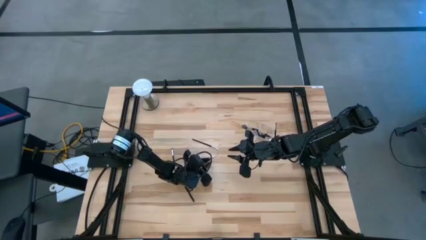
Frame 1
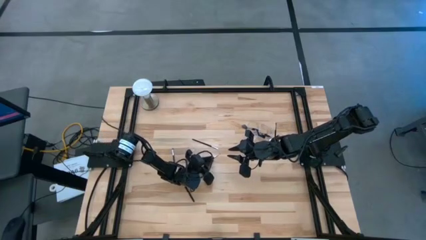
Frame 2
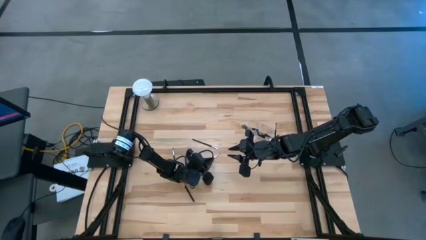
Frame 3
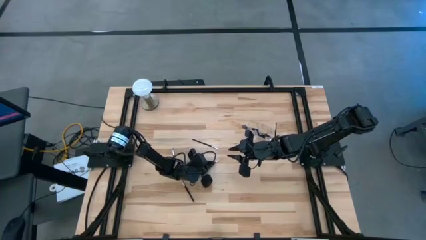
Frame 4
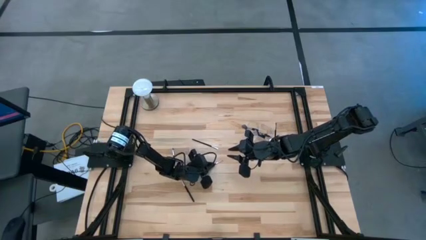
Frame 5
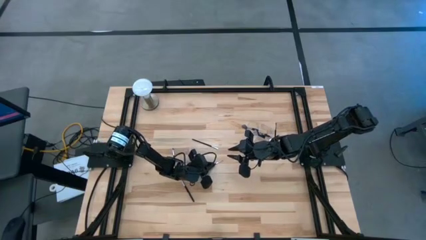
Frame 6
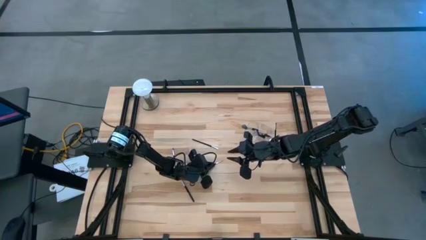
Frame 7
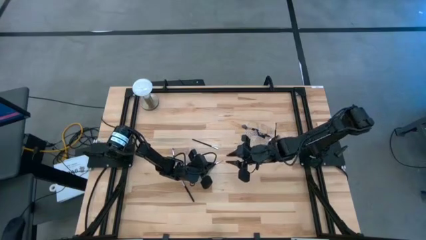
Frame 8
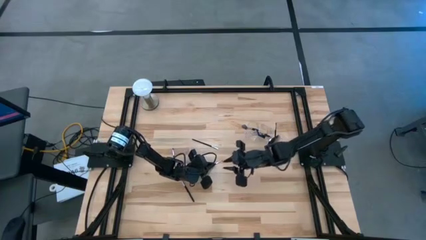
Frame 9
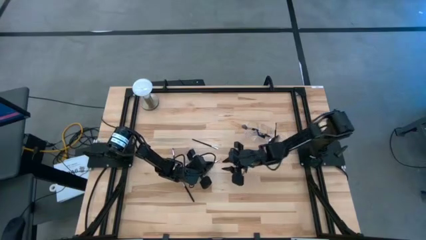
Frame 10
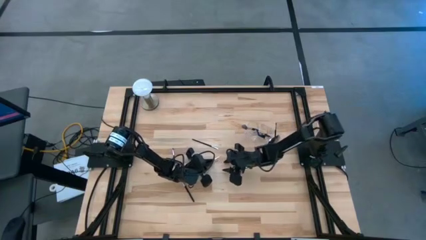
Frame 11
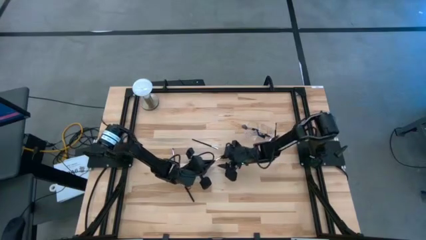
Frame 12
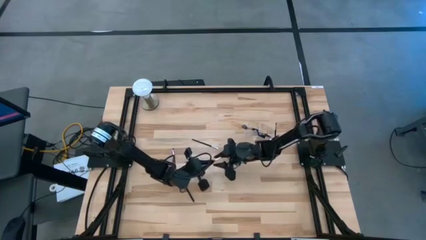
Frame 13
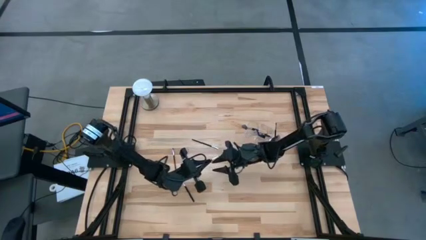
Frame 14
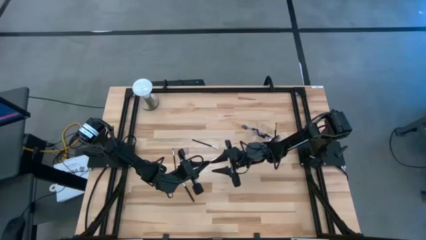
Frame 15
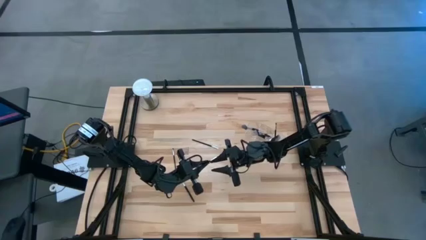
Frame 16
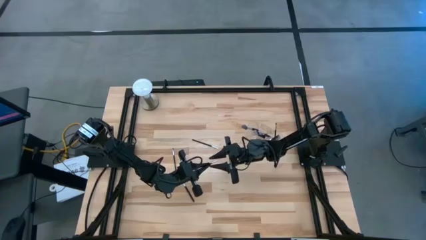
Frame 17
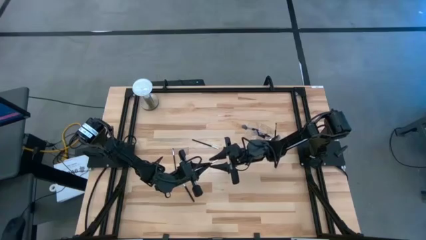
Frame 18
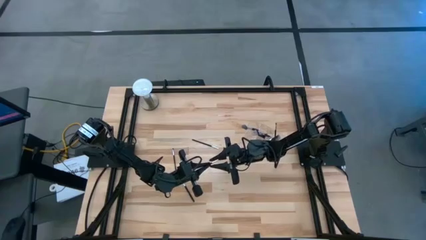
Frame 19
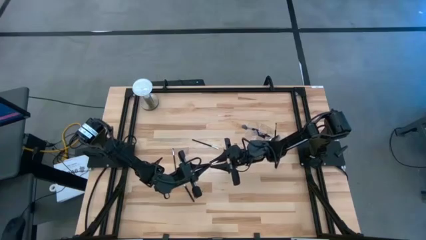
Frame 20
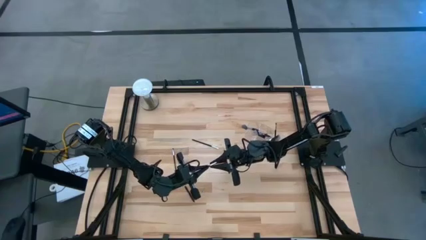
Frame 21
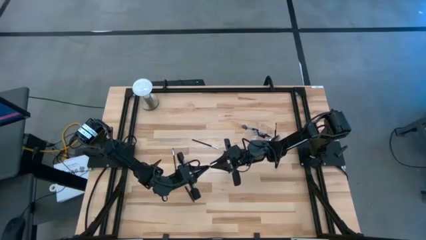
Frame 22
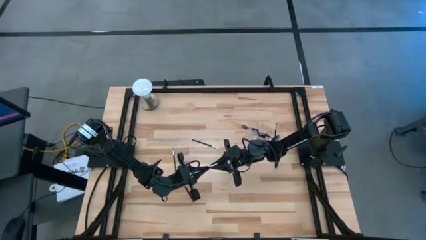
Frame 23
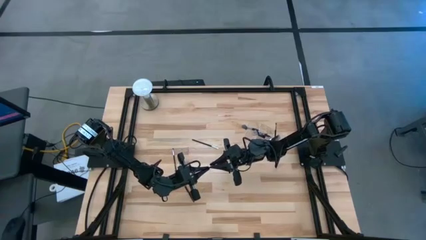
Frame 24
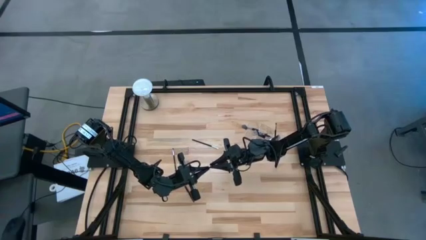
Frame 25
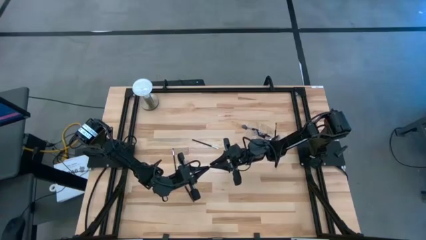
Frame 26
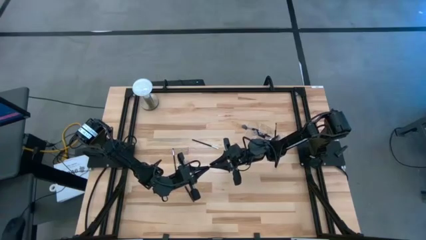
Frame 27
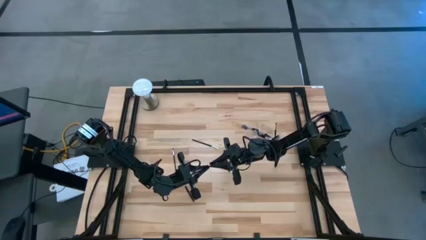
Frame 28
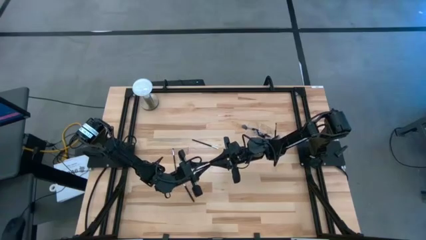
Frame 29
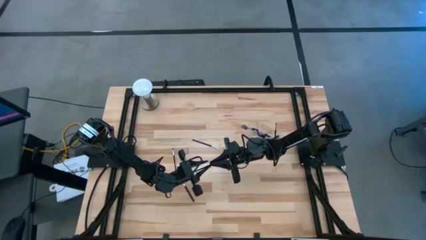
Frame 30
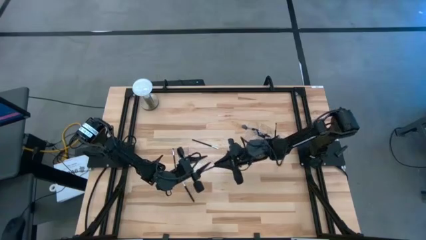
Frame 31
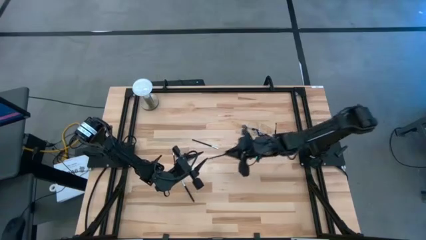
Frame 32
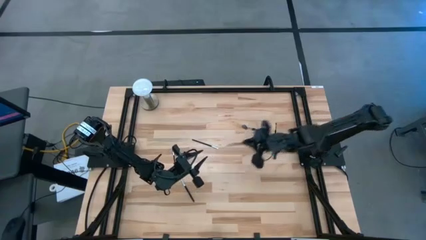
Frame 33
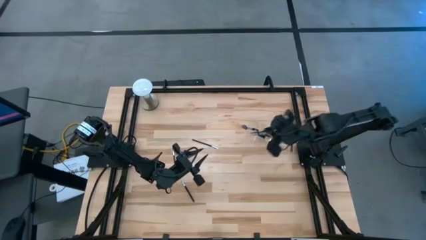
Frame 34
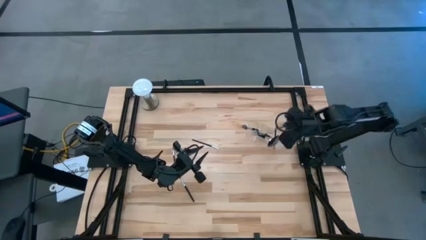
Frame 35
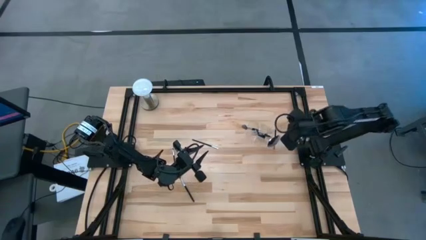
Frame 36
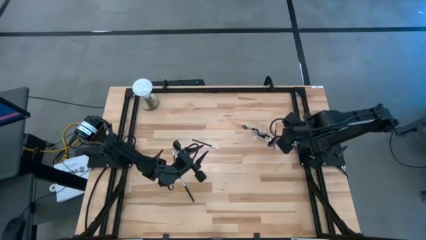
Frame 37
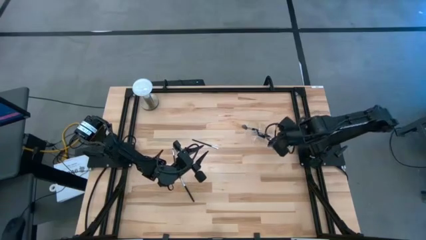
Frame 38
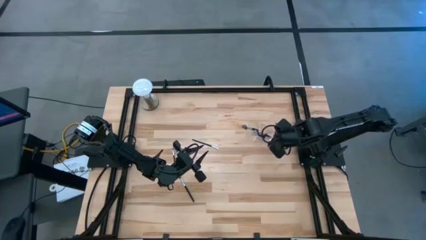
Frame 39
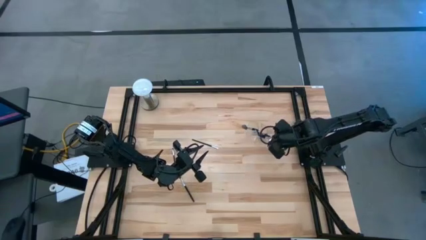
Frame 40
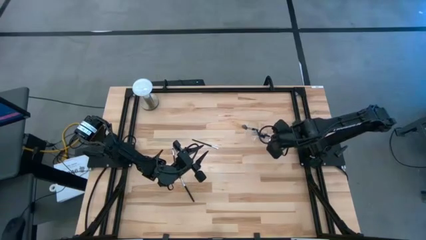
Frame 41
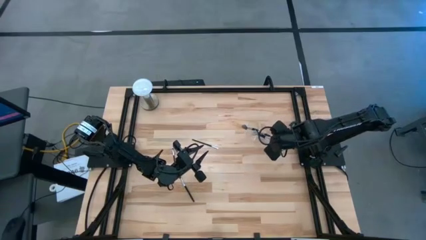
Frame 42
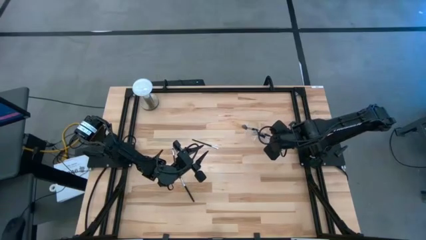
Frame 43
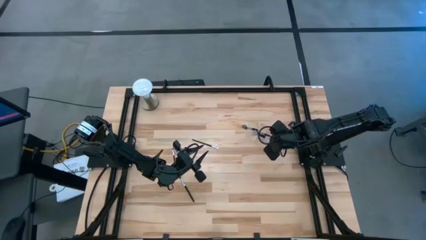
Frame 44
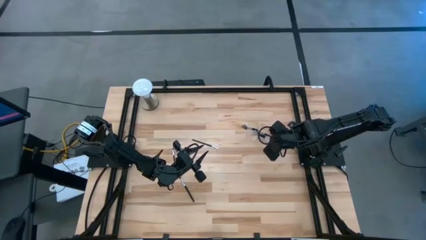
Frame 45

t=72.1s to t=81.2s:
Task: Pick & Place Makeup Supplies
Put the black makeup brush into the transparent organizer

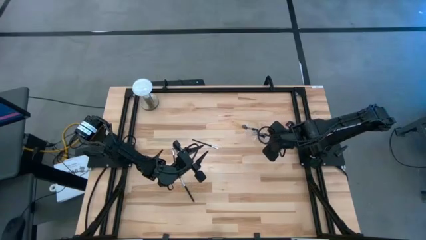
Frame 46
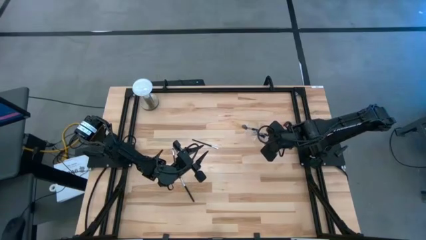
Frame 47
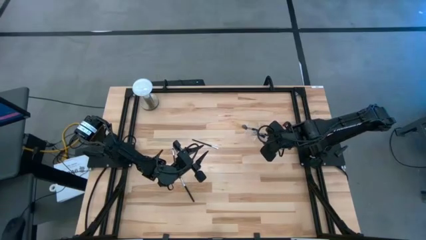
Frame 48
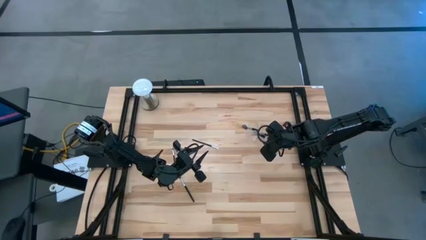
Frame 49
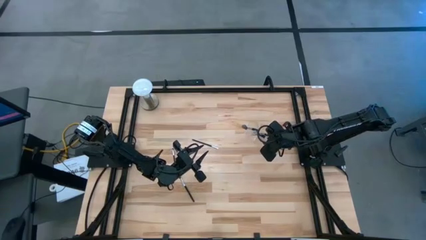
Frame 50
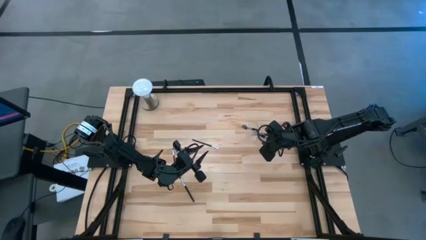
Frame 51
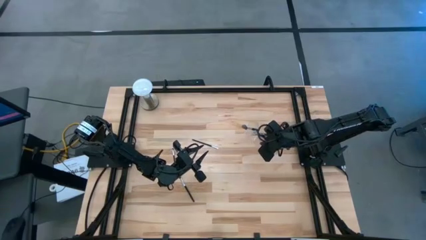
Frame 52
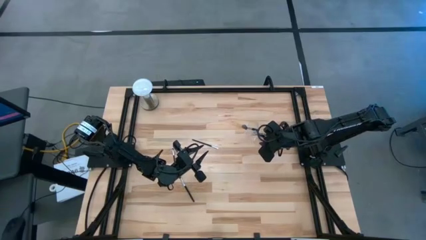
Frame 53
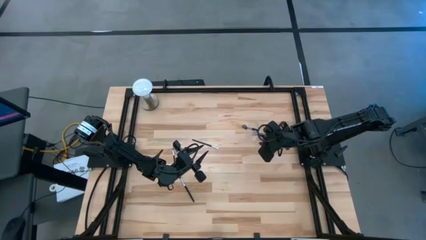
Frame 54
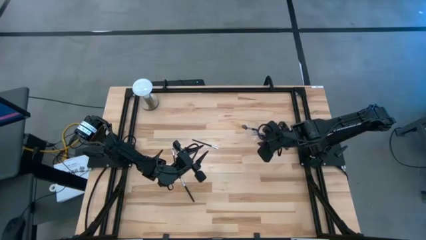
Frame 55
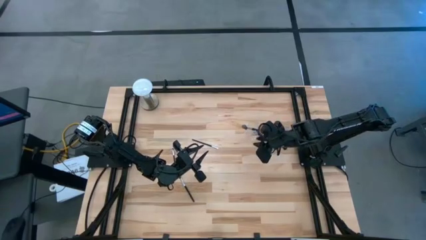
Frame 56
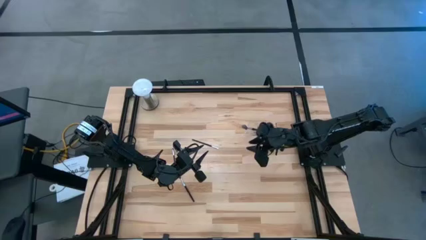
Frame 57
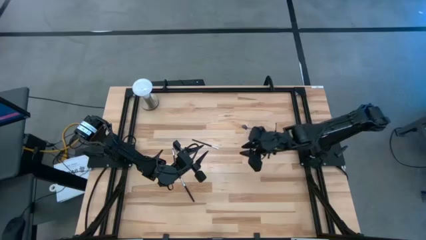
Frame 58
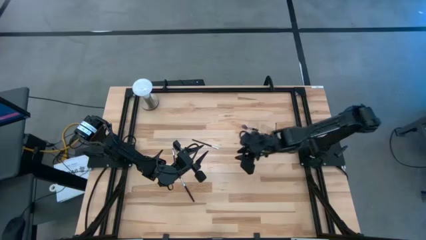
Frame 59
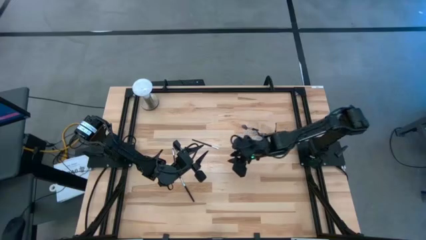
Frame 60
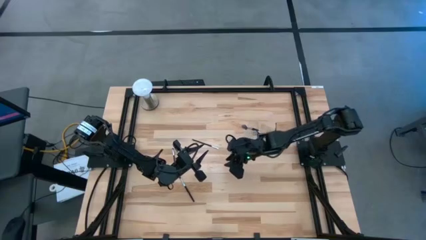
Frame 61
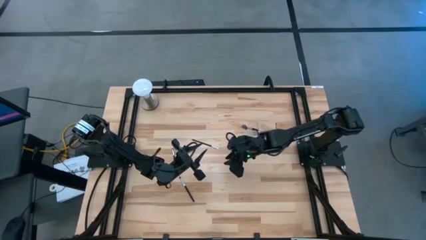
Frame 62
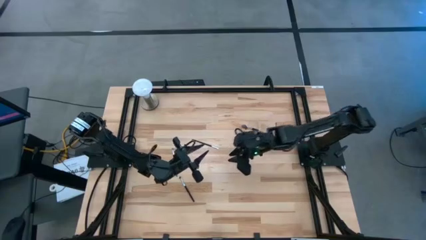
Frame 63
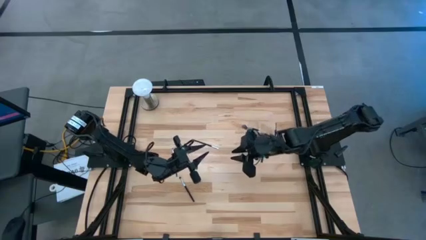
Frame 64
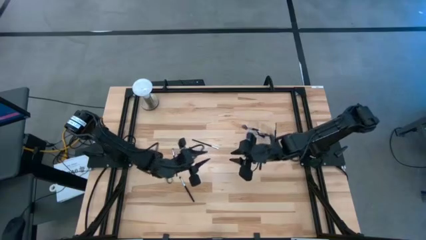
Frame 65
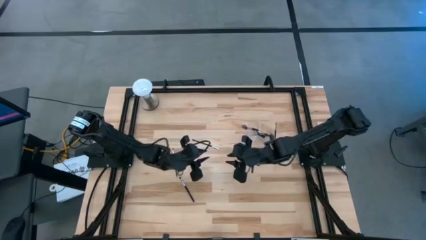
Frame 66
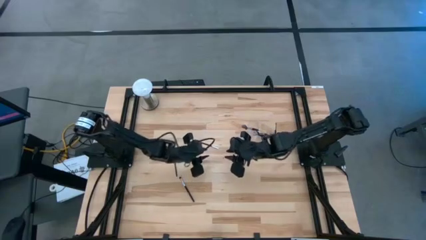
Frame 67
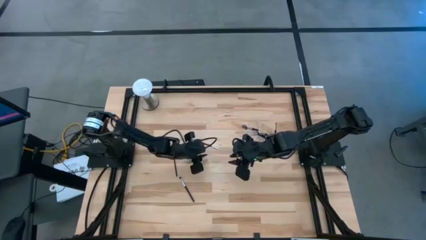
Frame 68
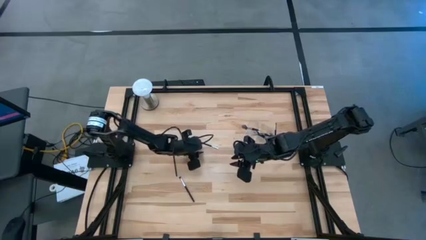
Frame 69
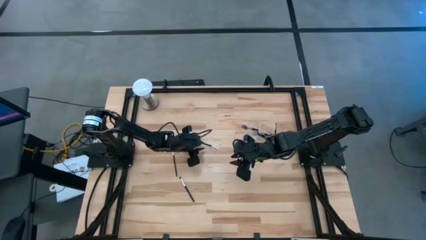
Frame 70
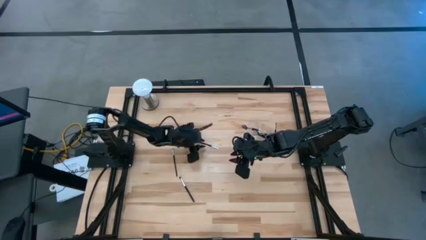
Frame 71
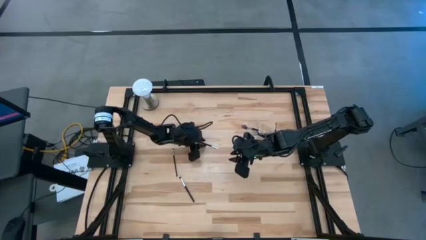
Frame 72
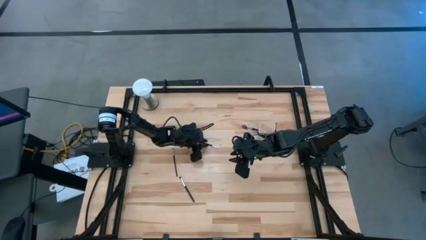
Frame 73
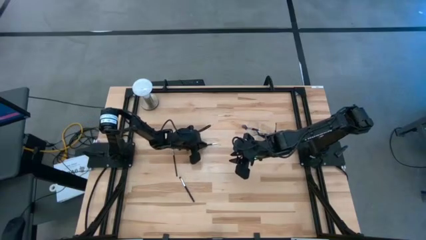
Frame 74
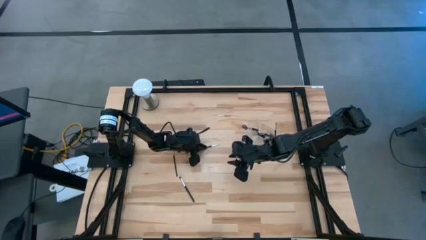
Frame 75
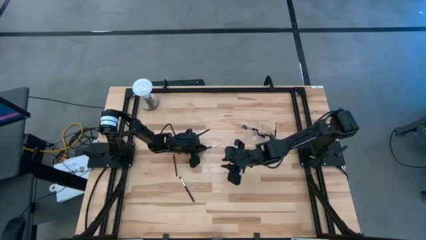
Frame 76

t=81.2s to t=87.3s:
Put the black makeup brush into the transparent organizer
